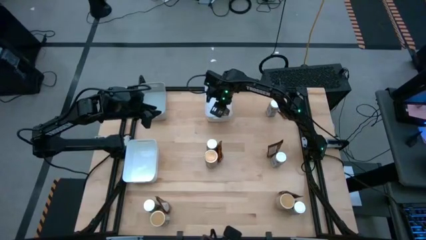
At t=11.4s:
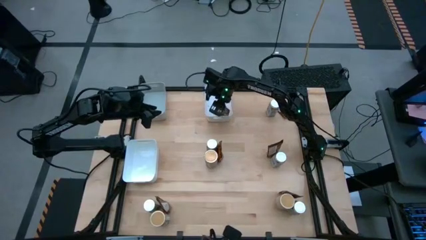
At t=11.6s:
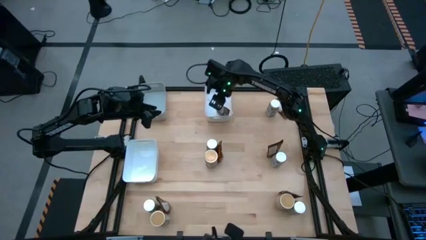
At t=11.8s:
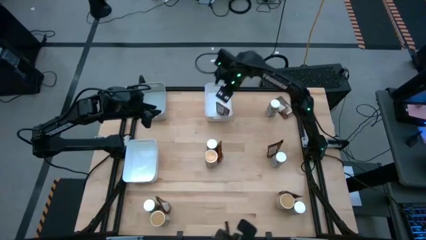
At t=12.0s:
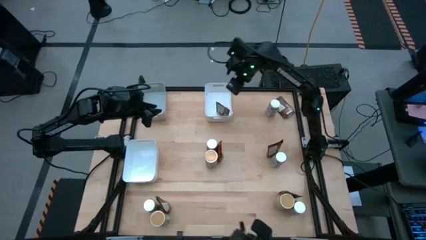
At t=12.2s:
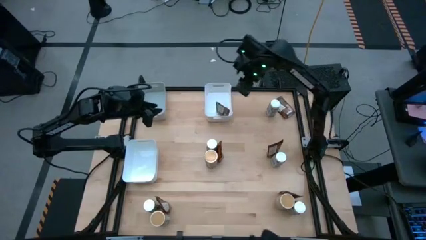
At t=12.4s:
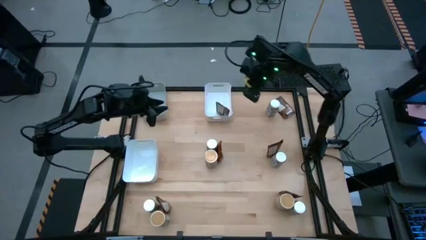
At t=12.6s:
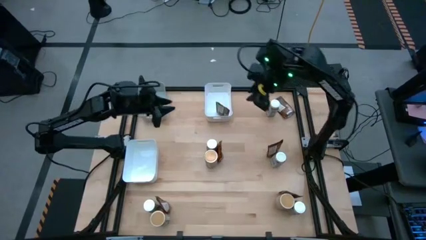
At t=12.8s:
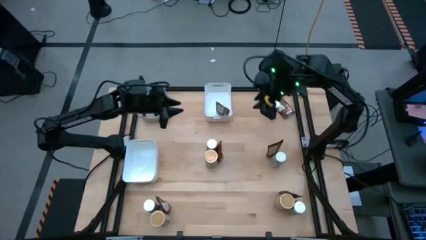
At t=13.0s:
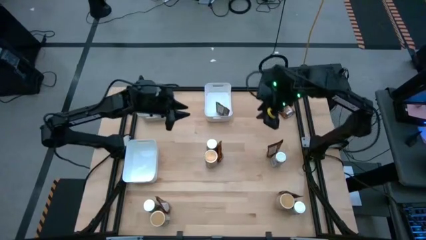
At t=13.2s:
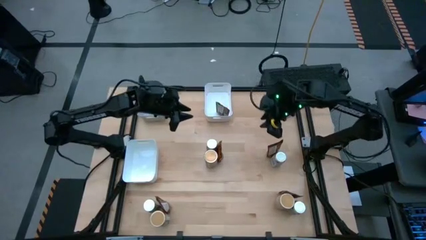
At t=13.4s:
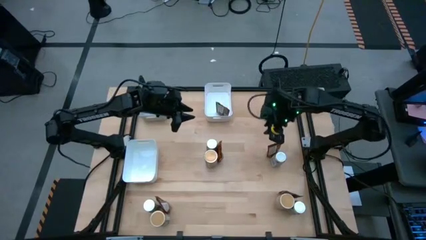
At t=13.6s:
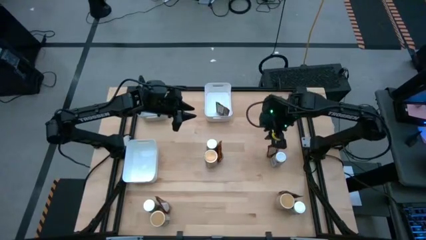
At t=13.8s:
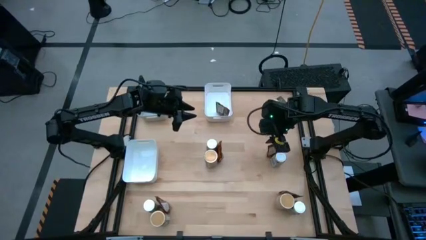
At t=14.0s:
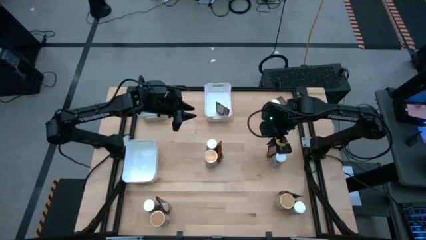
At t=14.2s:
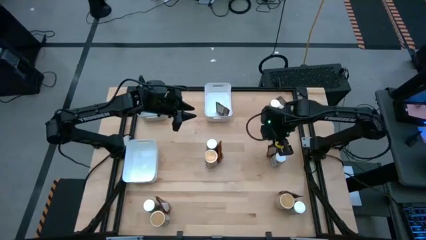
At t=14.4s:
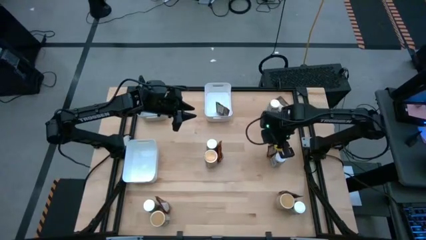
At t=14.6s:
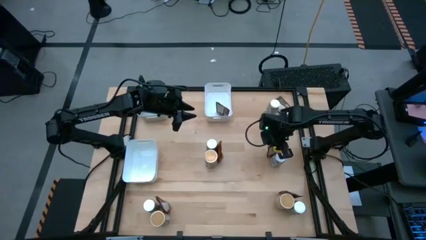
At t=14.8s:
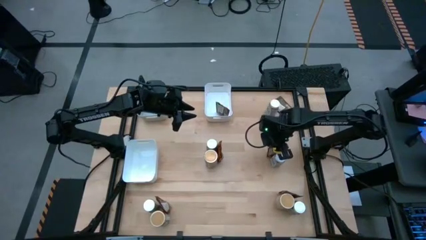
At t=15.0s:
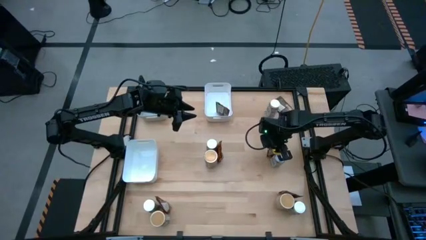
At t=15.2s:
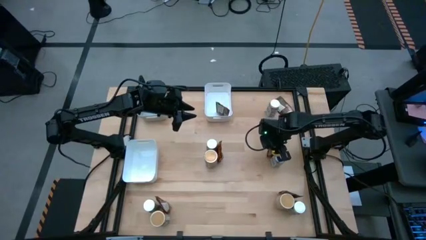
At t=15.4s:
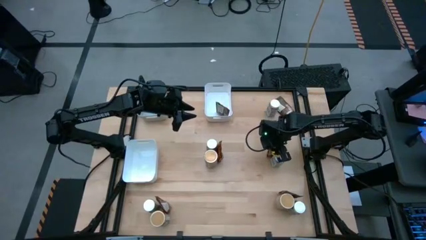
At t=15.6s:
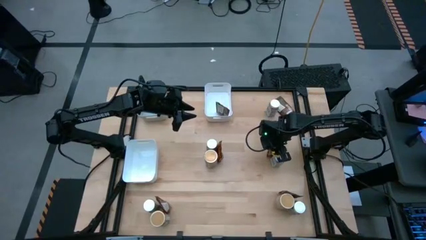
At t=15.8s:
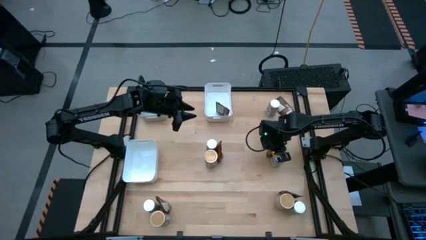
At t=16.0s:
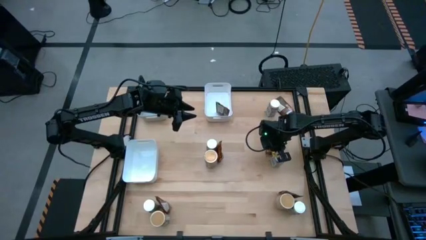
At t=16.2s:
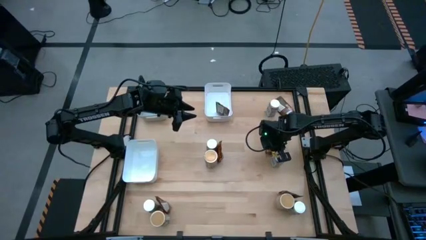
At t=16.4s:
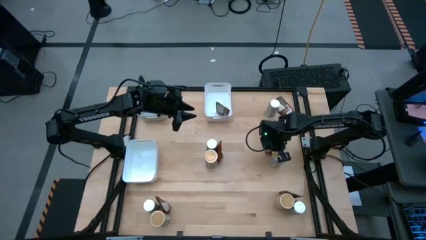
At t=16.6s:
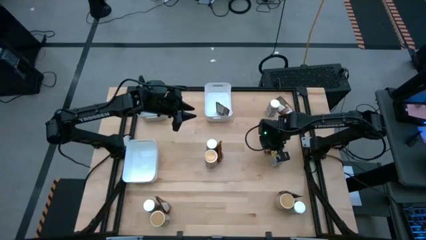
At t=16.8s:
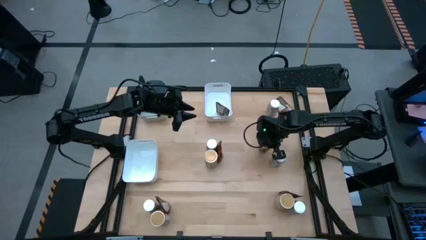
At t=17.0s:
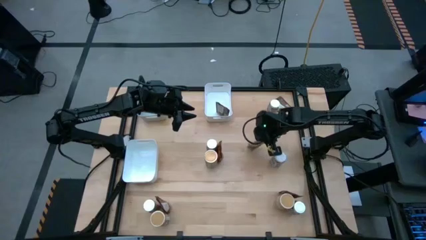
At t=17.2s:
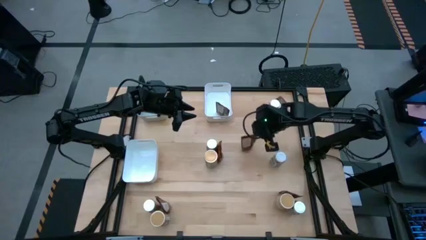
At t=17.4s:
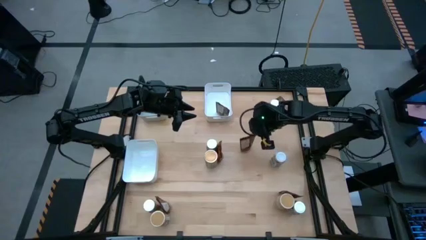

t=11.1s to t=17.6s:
Task: Sort spices by type
Put the brown seasoning pack into the top white bin

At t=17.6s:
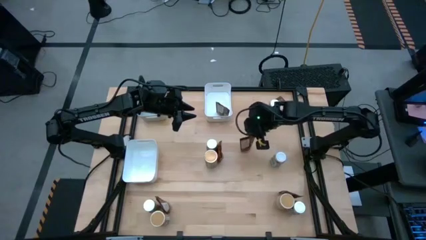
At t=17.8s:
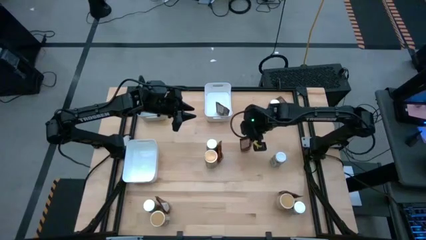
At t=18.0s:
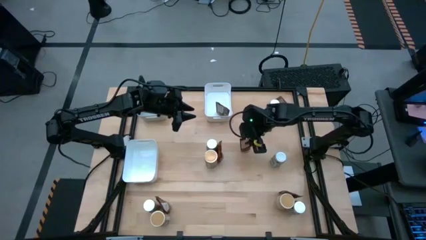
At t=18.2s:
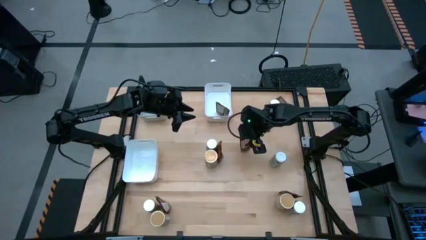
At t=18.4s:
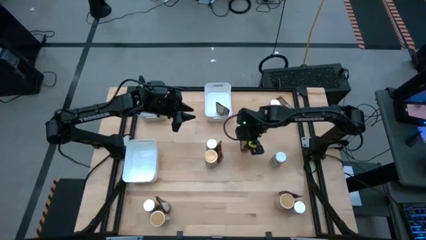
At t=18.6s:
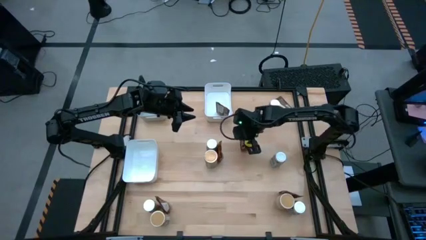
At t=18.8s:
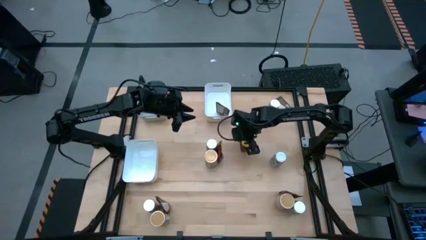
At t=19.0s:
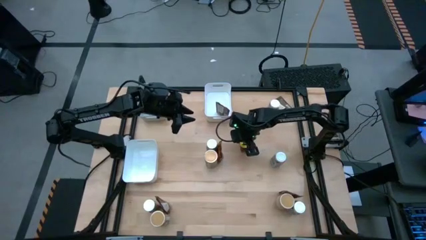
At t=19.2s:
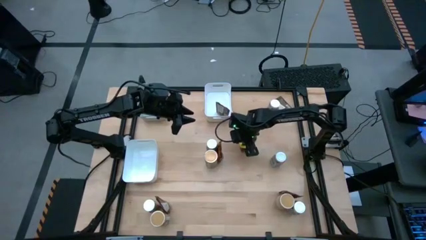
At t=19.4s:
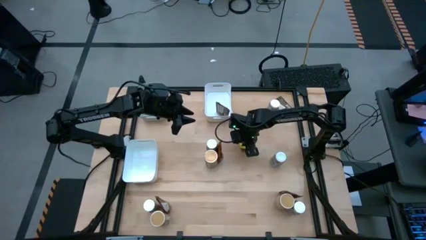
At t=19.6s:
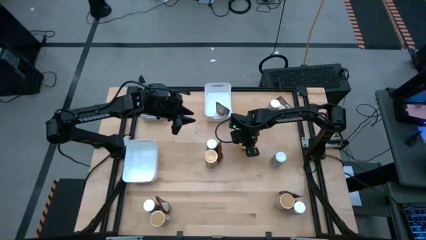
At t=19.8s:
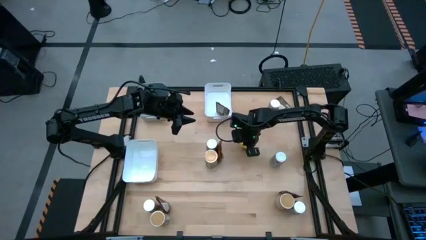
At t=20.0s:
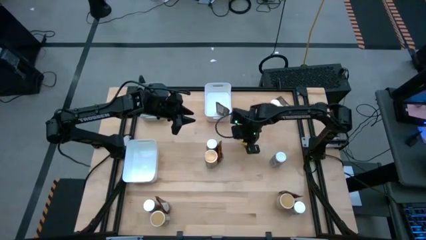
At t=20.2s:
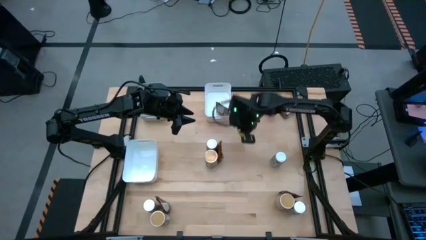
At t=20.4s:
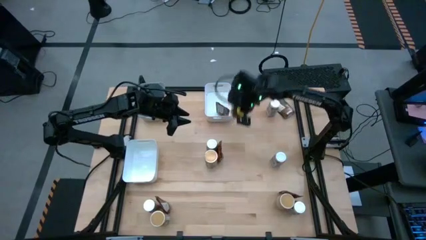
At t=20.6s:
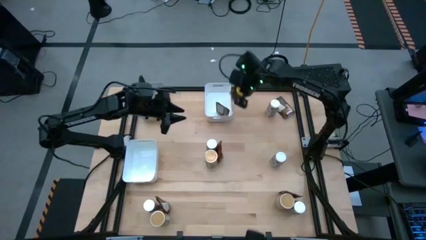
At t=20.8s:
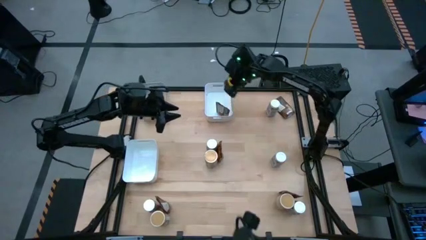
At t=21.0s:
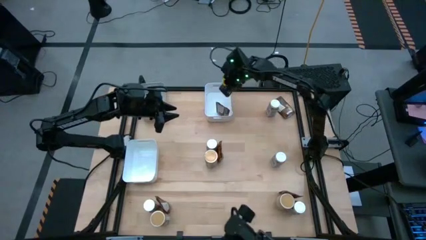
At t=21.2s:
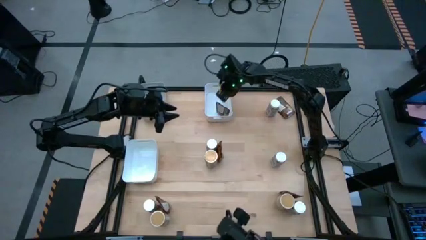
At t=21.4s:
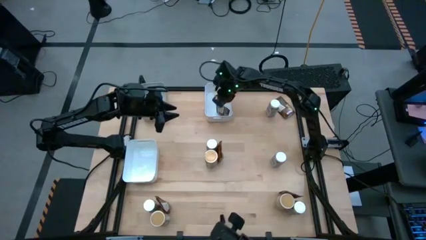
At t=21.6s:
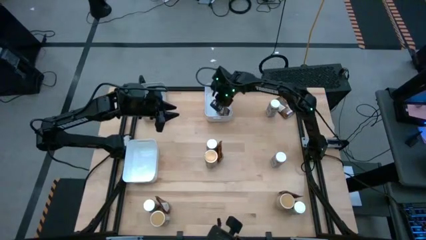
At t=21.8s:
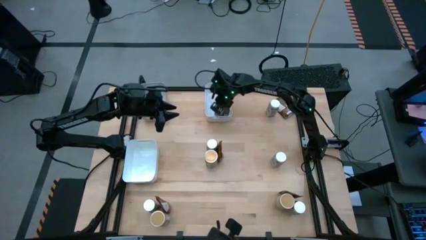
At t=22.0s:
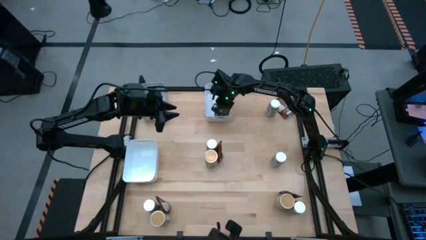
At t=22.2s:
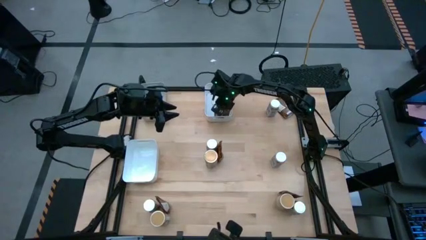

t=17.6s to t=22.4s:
Put the brown seasoning pack into the top white bin

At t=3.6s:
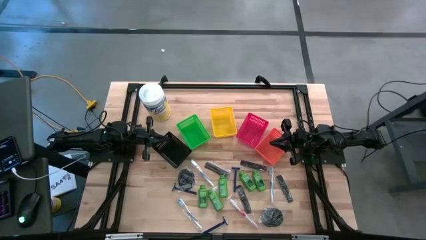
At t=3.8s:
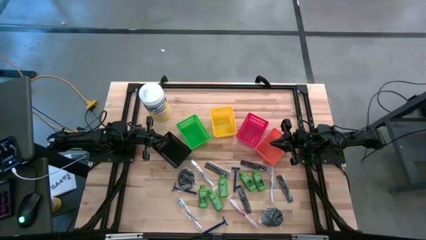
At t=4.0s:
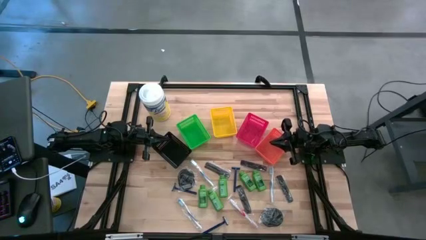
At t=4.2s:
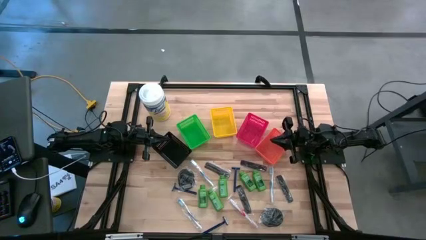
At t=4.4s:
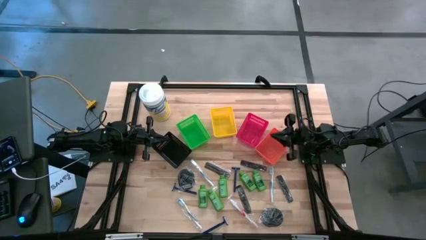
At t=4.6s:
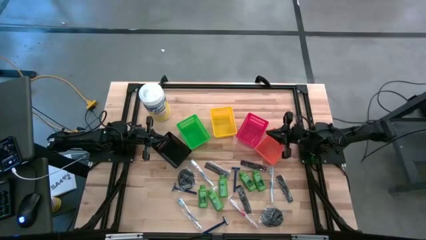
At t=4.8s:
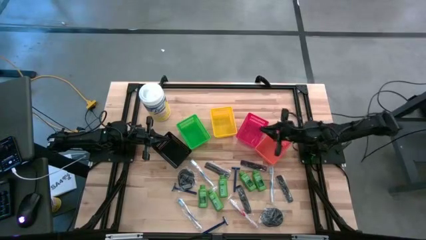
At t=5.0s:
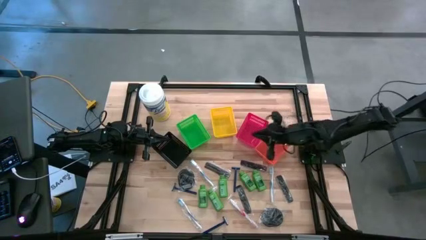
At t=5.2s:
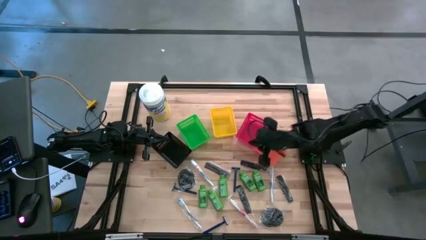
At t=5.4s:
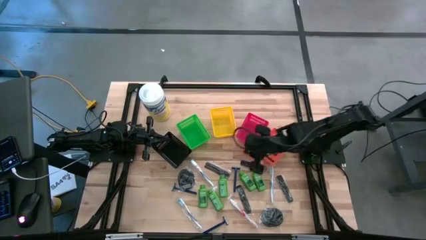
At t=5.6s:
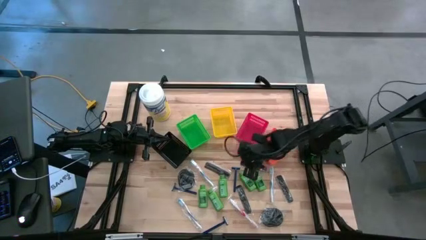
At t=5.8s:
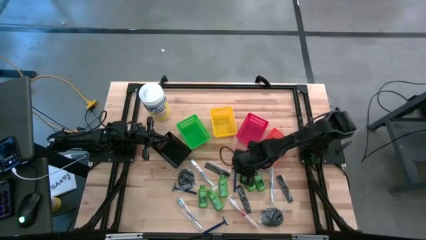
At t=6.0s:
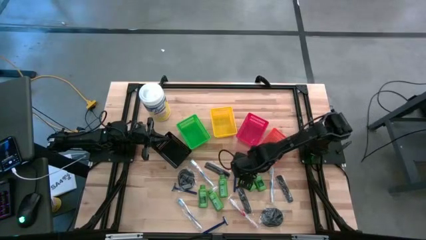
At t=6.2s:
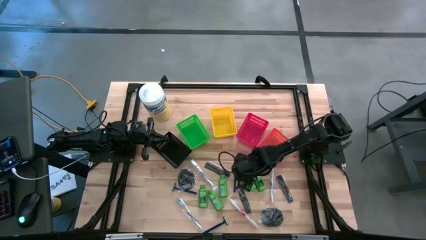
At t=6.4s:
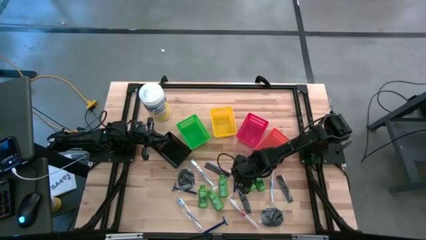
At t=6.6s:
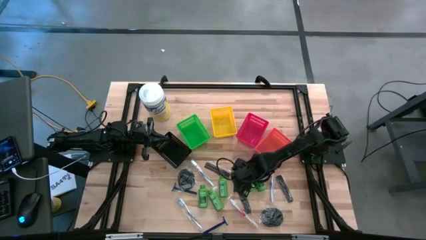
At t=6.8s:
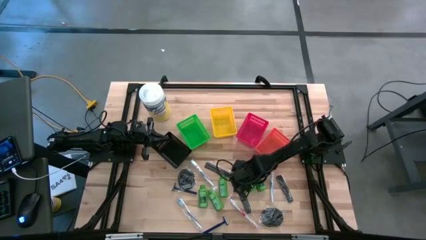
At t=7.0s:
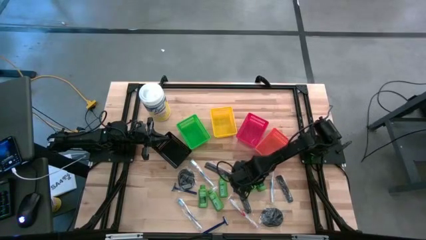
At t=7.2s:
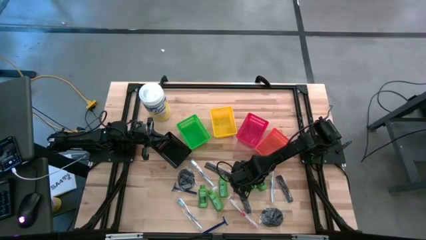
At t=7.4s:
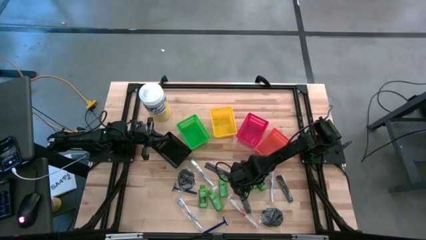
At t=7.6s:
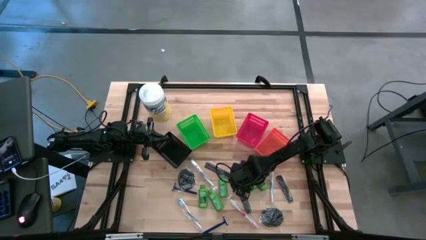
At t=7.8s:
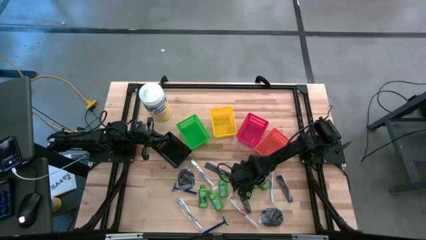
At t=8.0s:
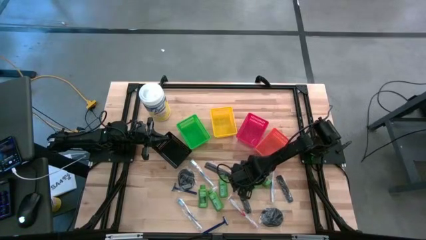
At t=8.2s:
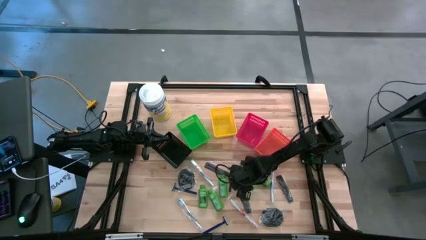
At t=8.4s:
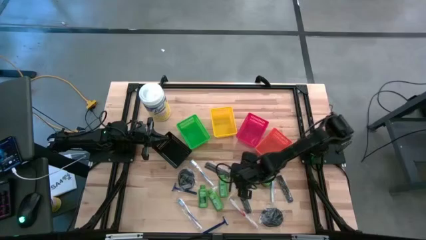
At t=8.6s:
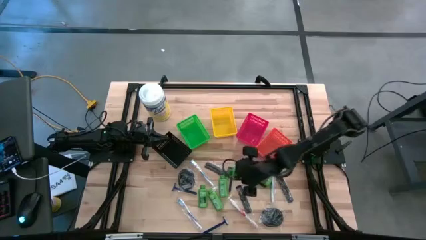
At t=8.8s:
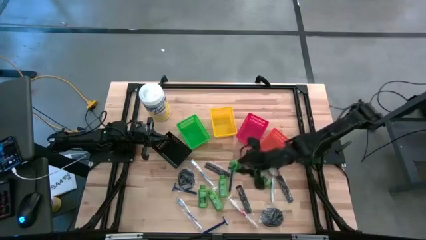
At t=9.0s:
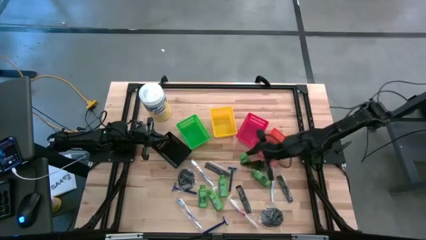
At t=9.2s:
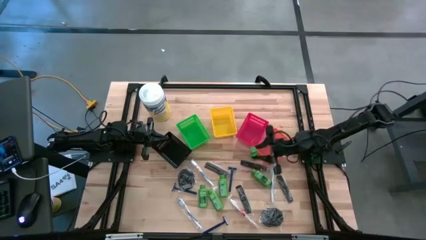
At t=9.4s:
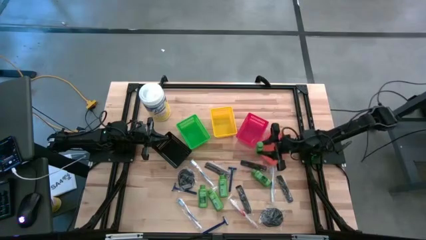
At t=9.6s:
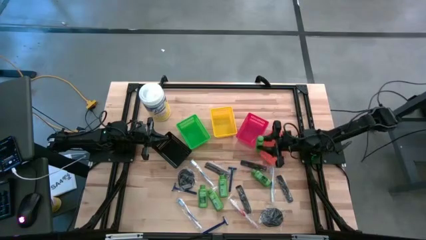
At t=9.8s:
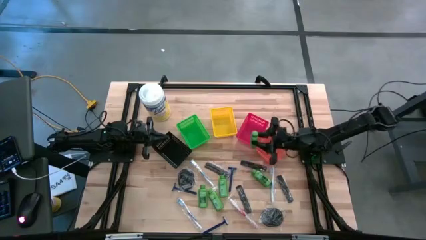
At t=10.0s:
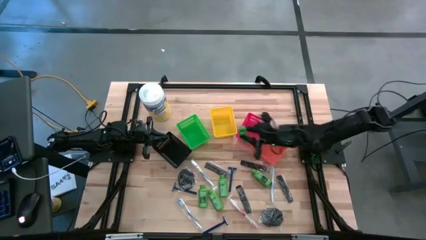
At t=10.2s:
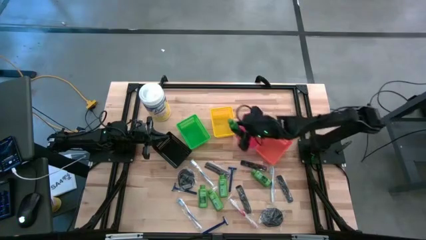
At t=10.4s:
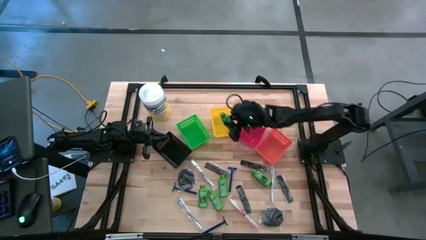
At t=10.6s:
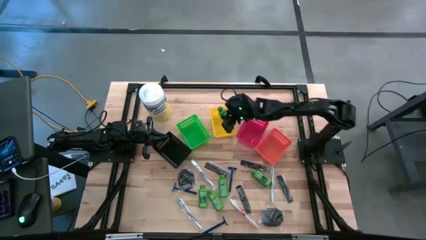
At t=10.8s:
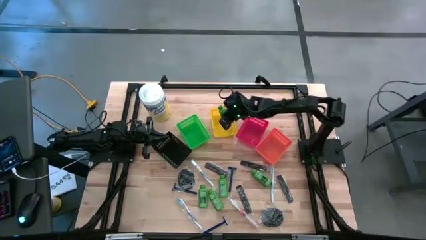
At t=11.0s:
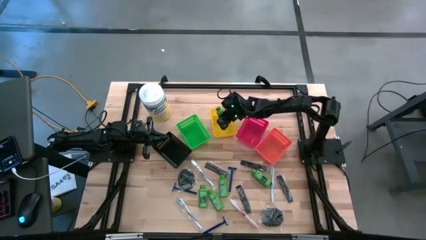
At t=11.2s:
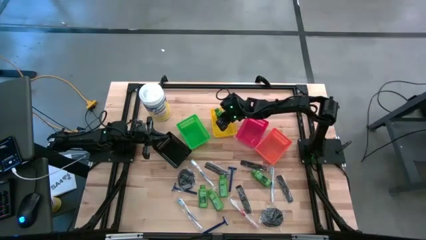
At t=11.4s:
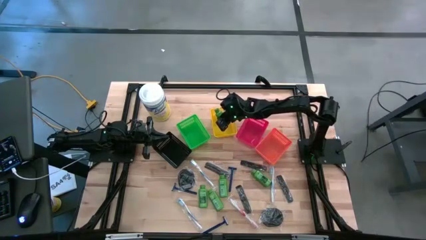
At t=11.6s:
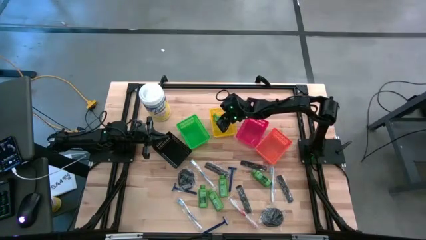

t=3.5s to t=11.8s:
Task: Pick & Place Travel size toiletries
Put the green shampoo bottle into the yellow bin
